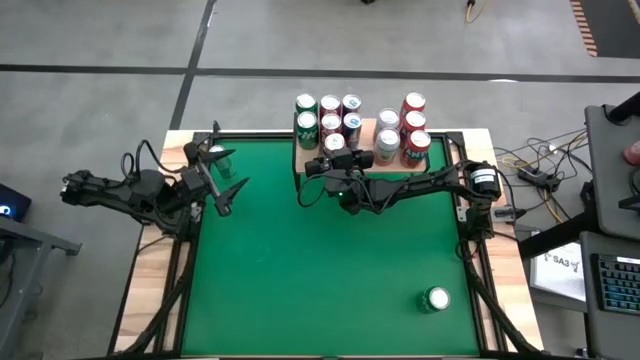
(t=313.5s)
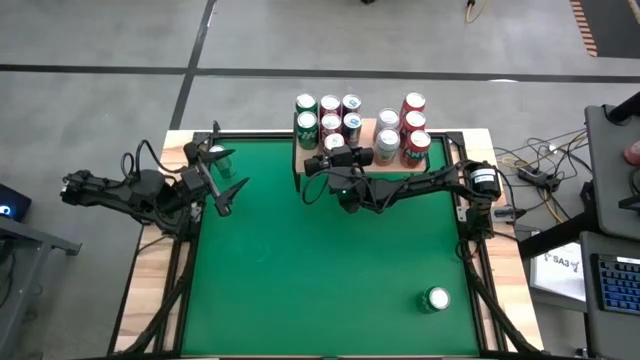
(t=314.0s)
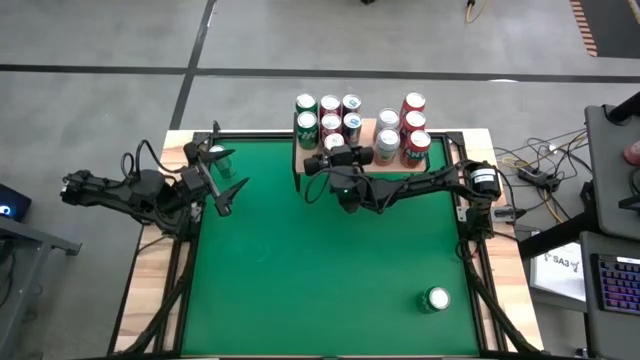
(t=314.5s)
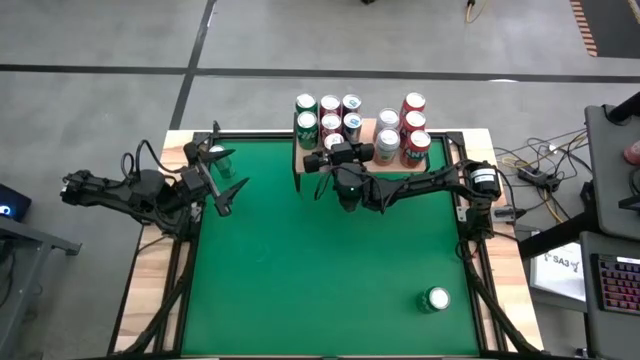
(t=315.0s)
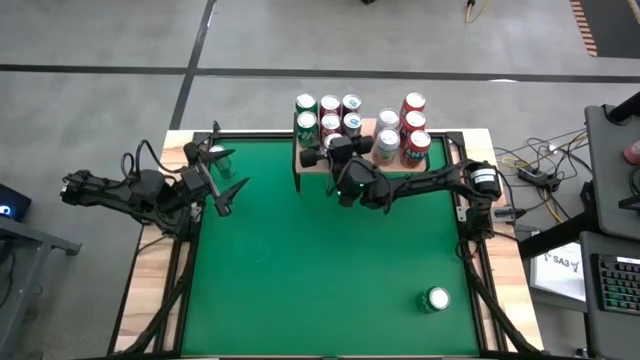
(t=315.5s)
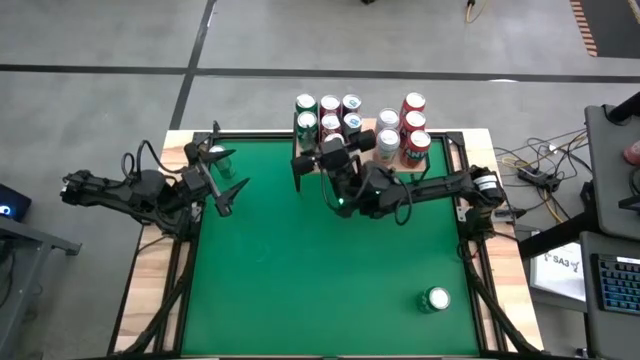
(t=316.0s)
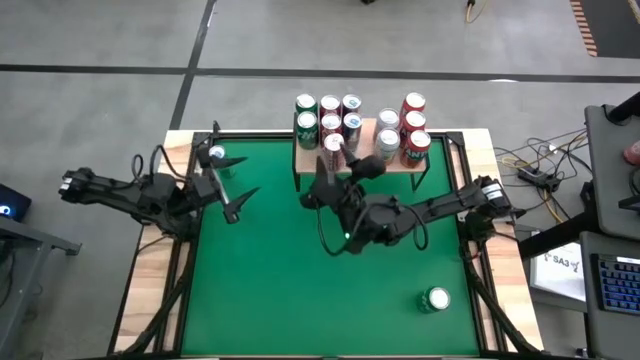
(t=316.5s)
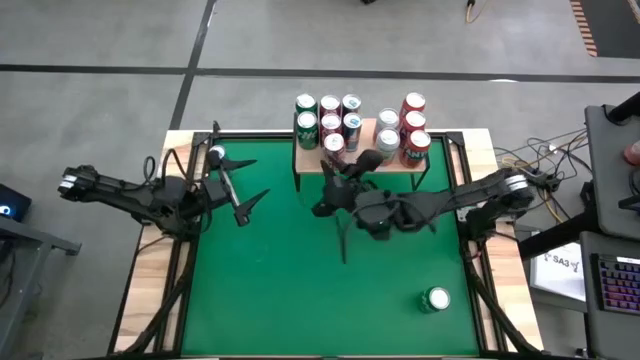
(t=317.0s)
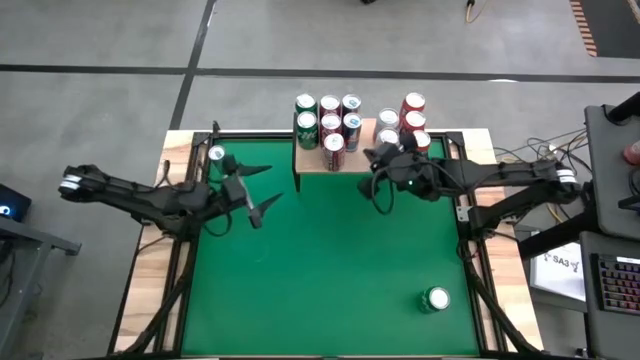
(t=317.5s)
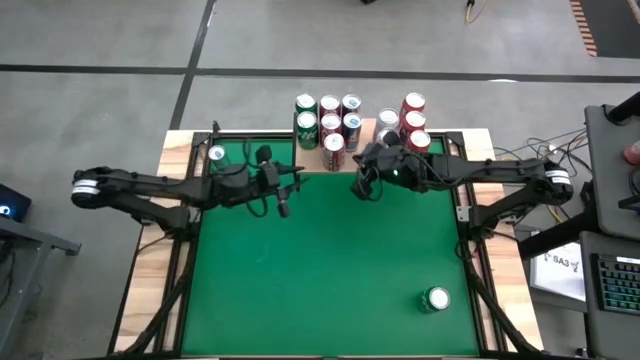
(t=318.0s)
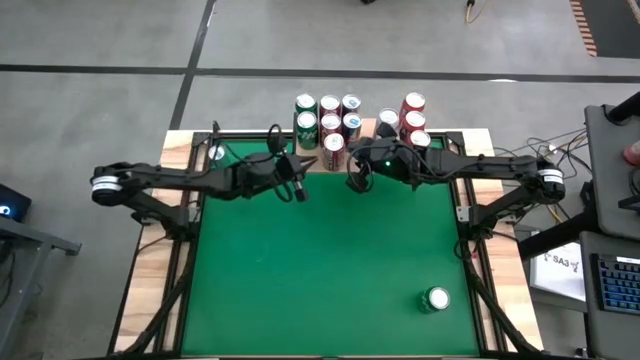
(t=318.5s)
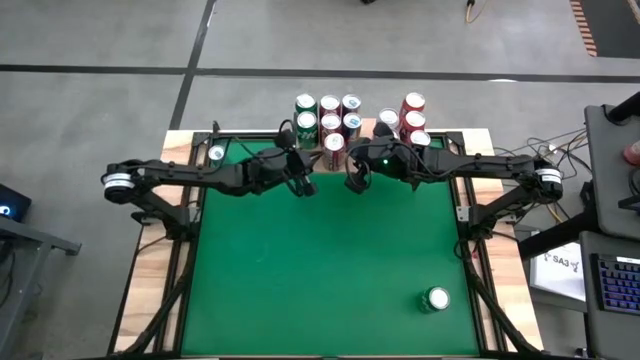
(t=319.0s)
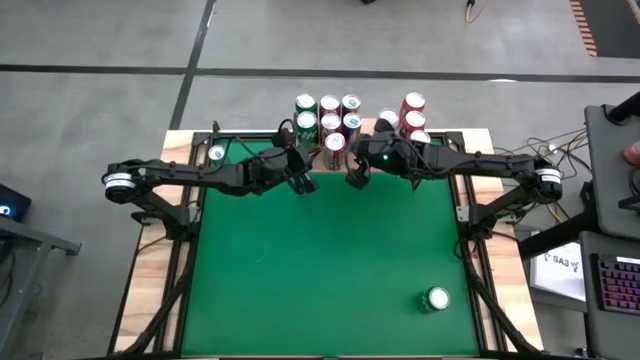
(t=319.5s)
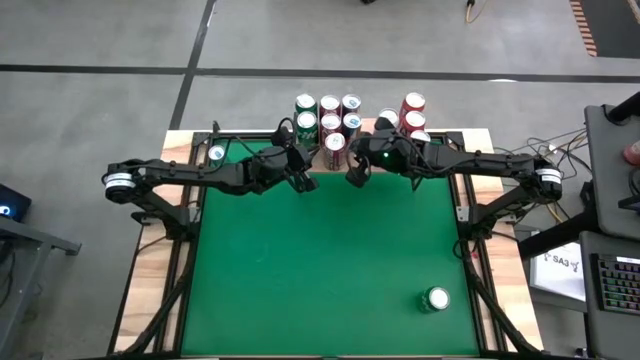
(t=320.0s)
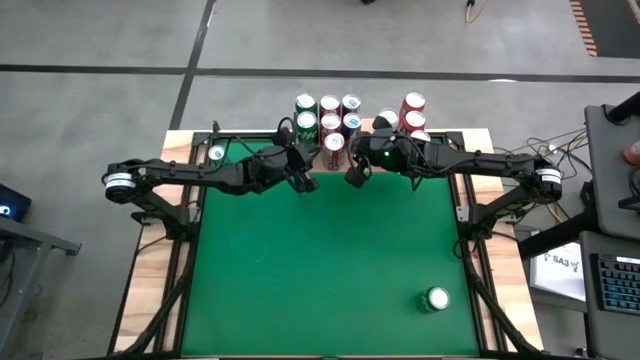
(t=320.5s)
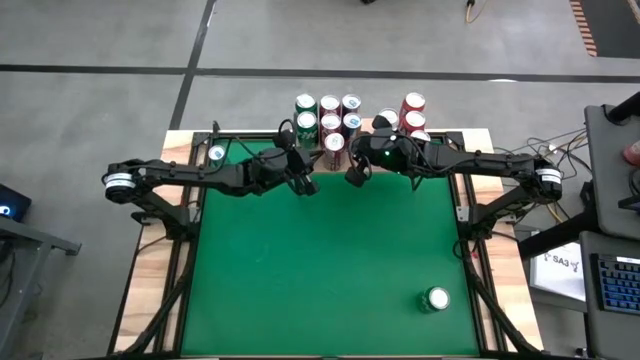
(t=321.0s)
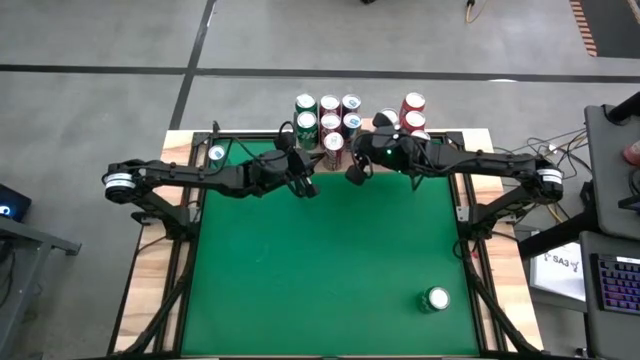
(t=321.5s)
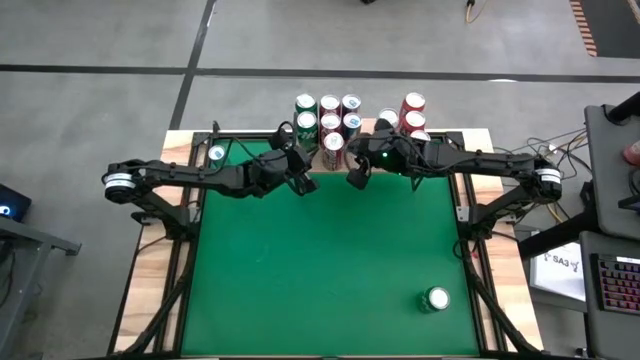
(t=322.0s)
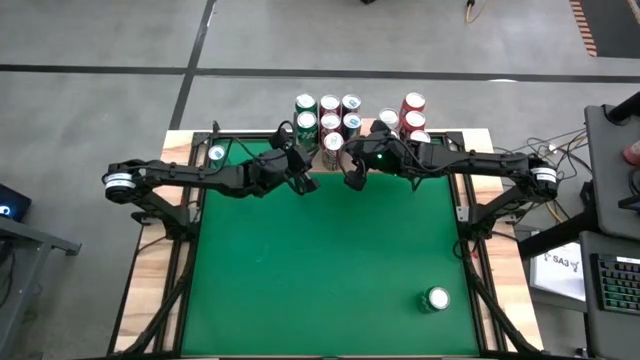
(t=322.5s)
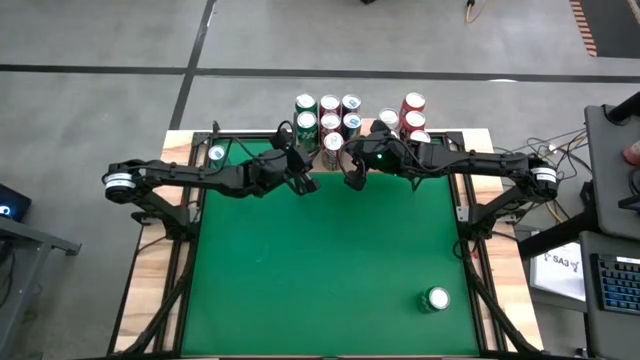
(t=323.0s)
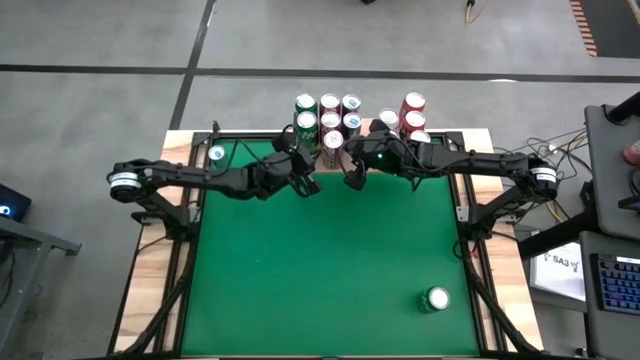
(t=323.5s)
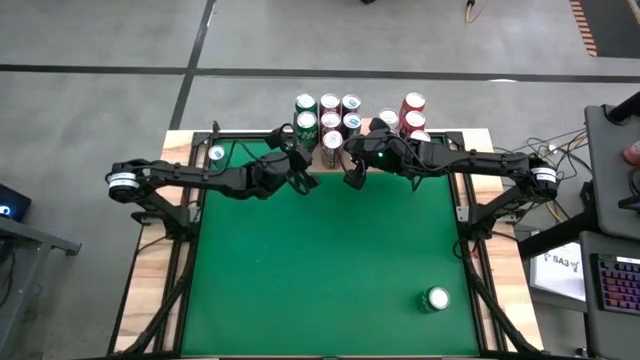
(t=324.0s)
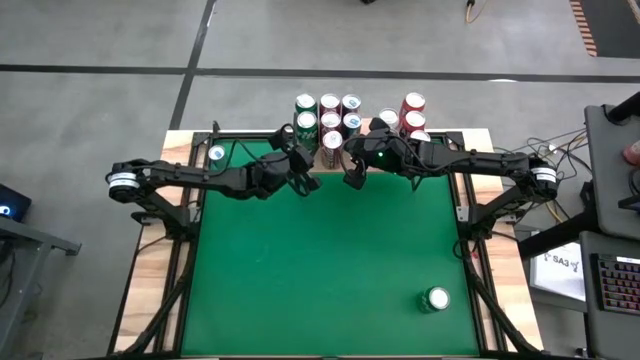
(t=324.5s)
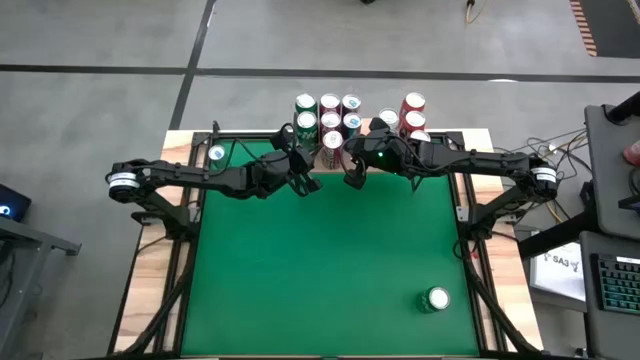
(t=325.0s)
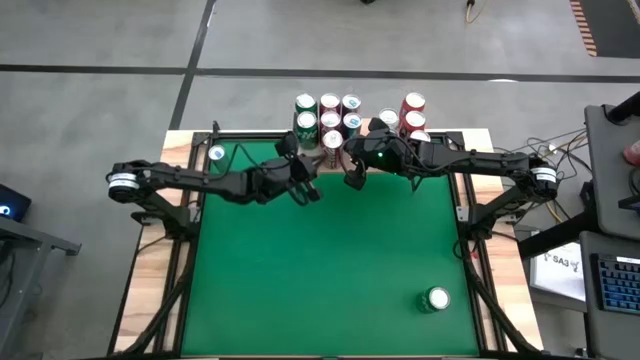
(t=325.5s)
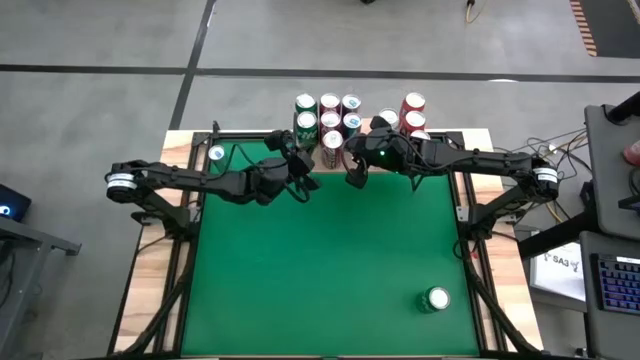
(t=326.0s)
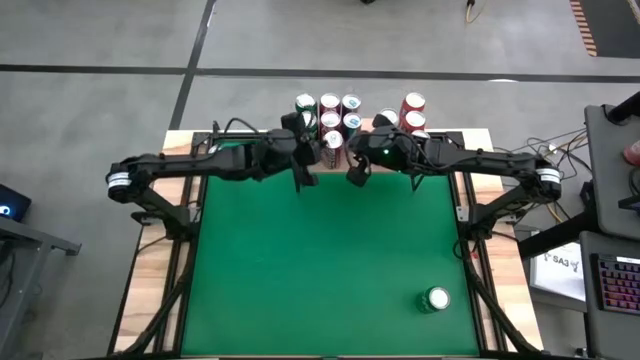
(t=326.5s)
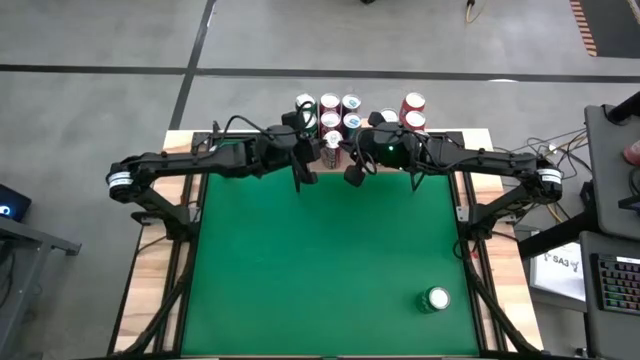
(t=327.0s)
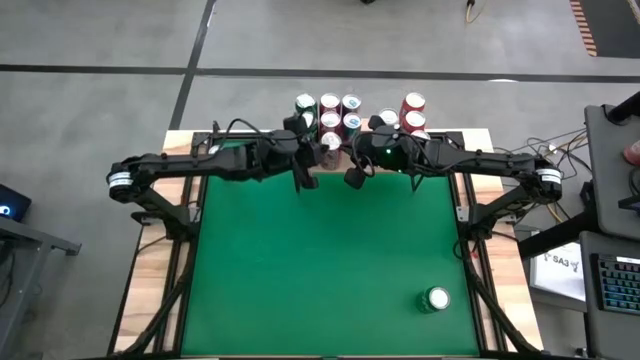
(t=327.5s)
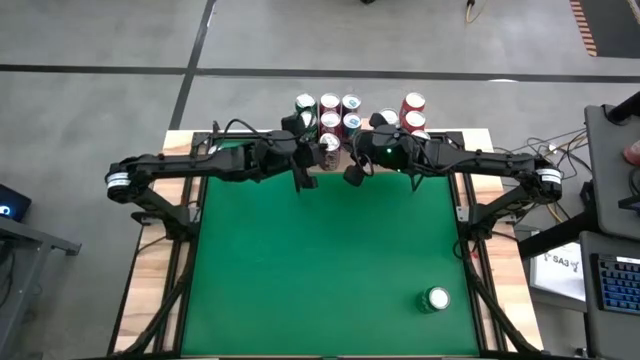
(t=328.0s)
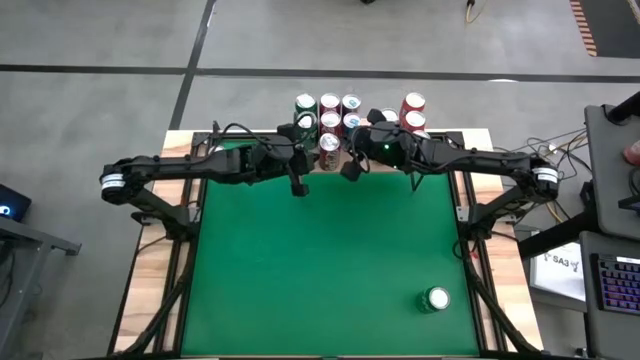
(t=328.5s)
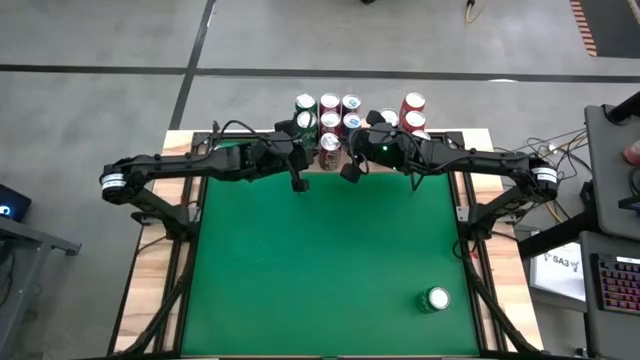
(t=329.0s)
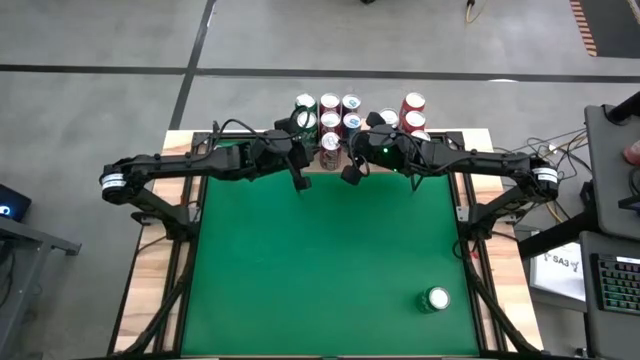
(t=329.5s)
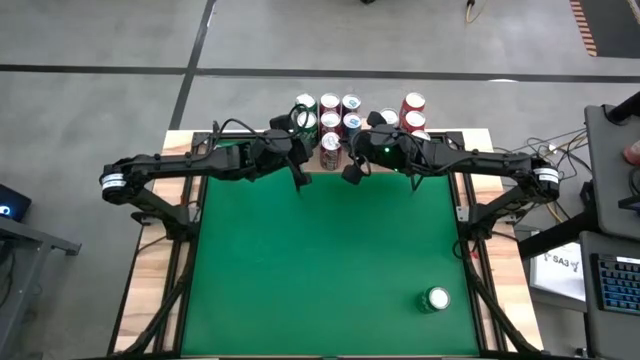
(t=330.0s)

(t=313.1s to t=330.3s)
Task: Place canned beverage on shelf
Put the red soda can aligned with the red soda can on the shelf

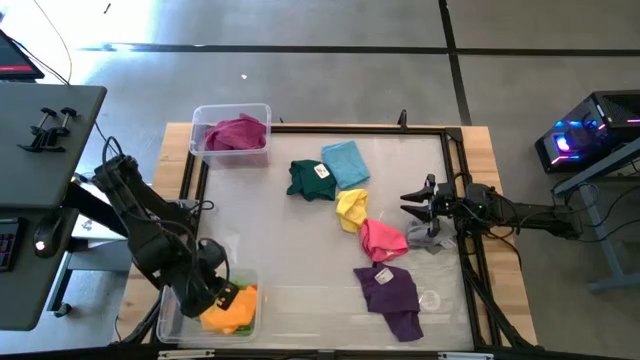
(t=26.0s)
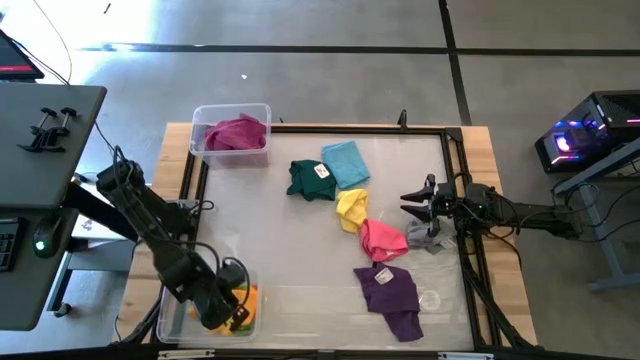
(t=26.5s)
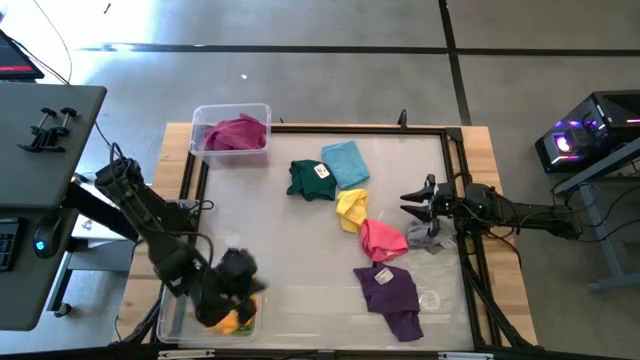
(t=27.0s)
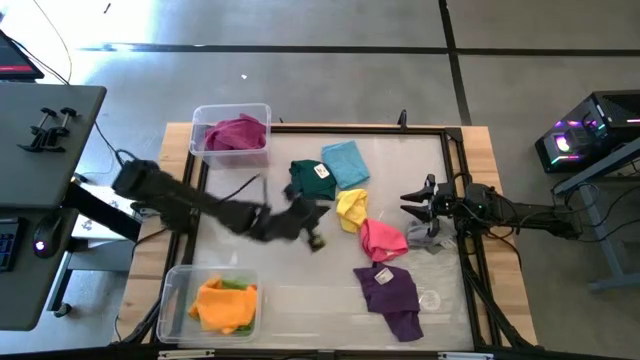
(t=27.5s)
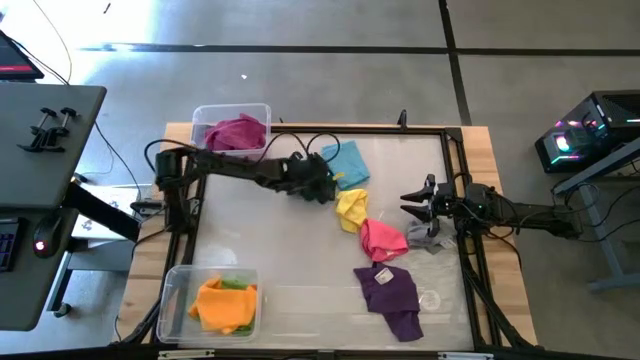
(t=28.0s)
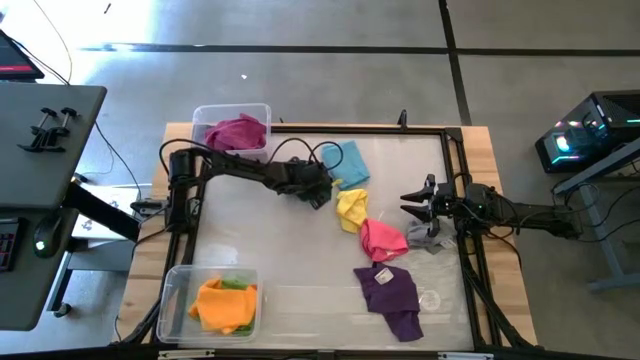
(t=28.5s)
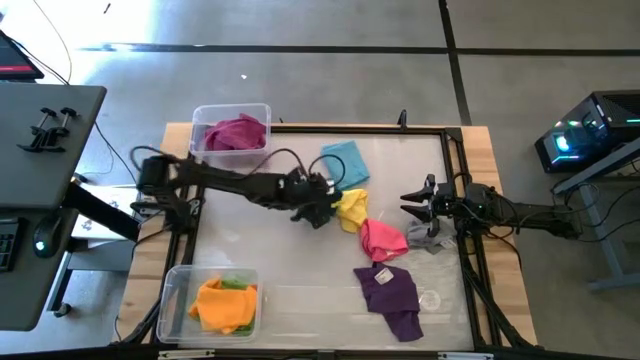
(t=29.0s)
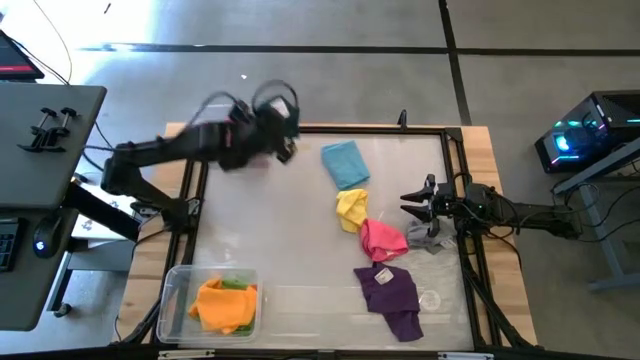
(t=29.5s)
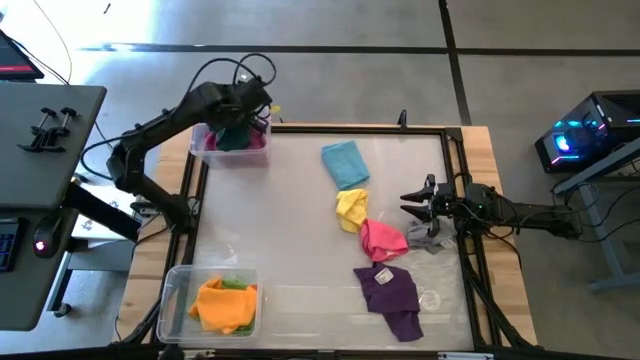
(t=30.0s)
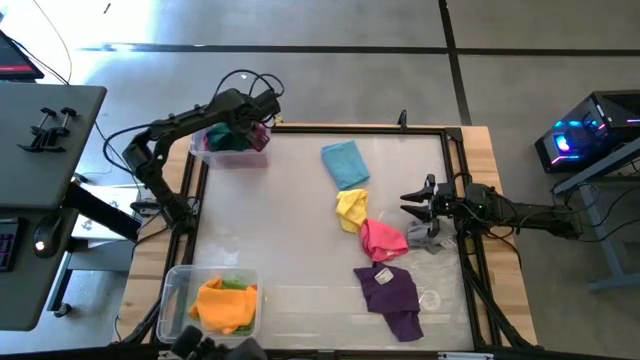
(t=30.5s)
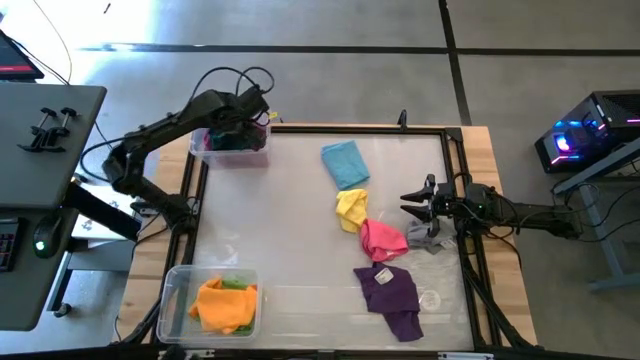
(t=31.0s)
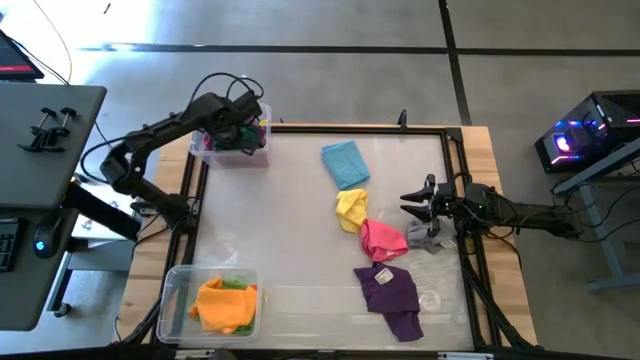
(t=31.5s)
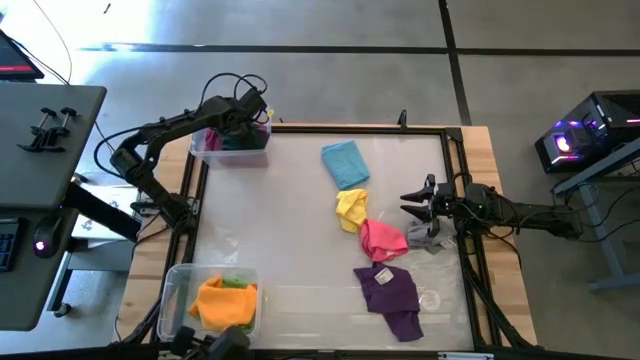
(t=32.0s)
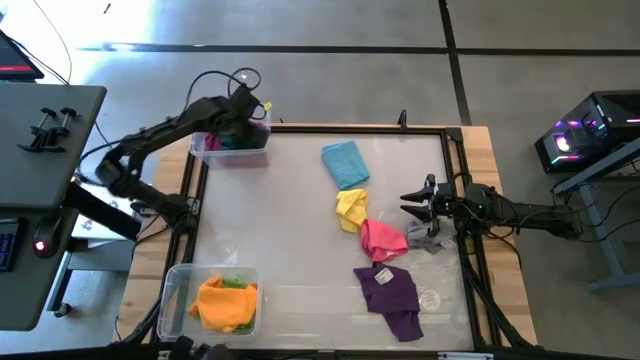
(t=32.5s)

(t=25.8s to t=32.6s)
Task: Sort towels by color in basket
Put the dark green towel into the top transparent bin
